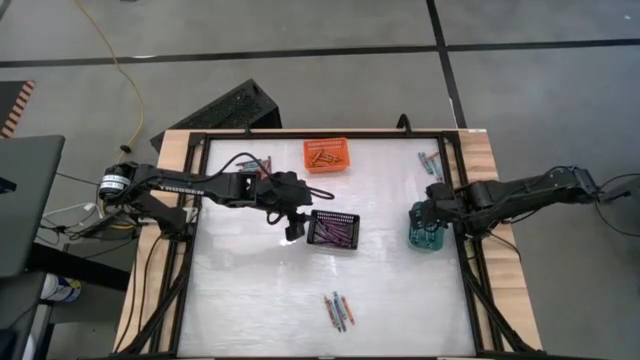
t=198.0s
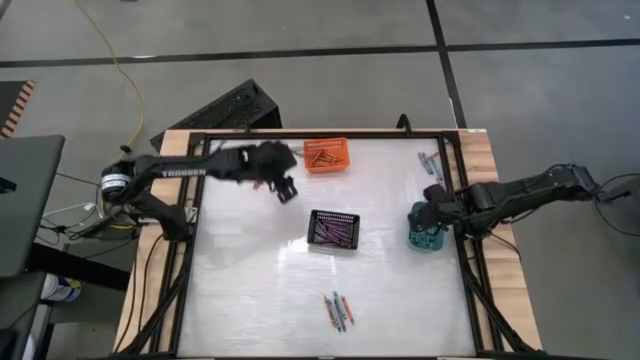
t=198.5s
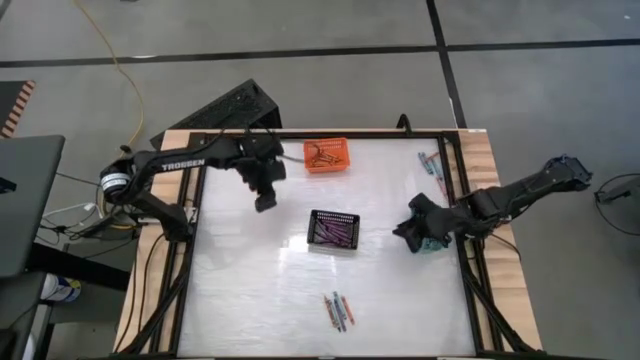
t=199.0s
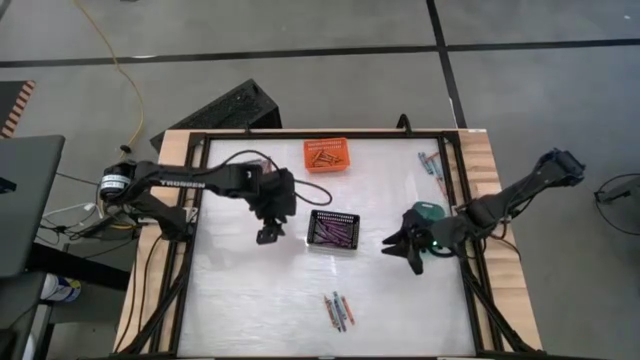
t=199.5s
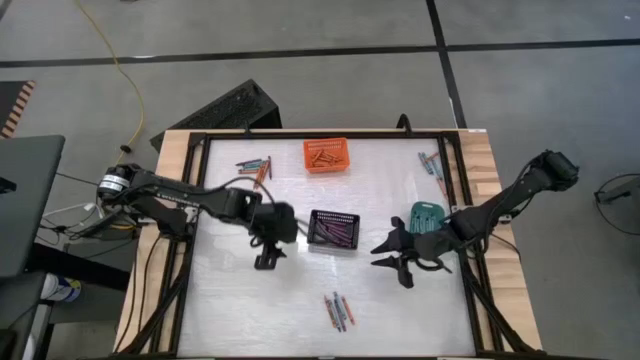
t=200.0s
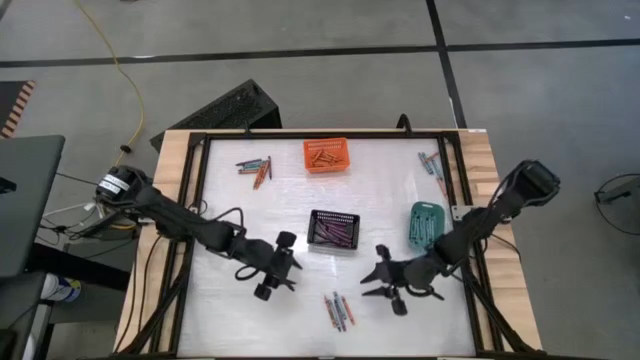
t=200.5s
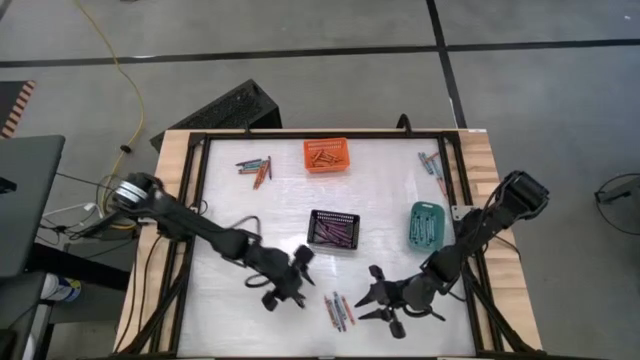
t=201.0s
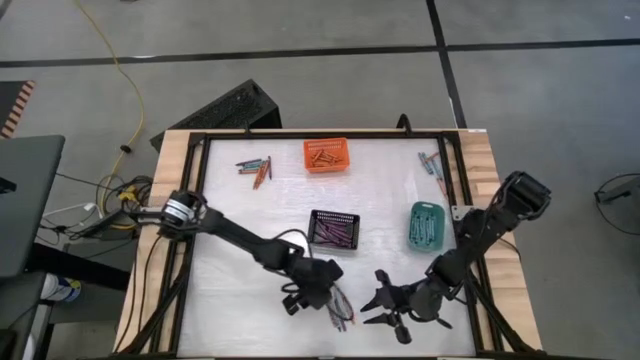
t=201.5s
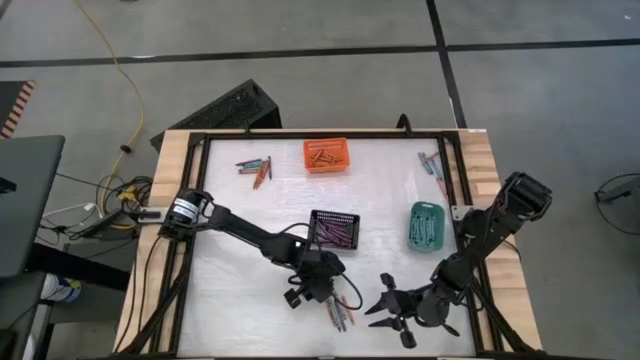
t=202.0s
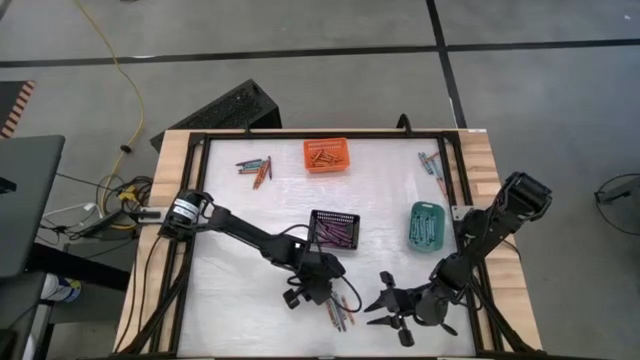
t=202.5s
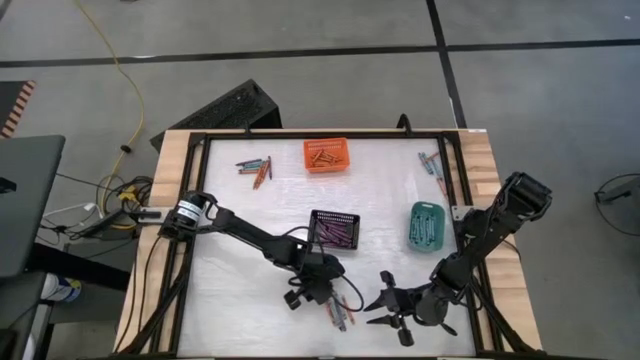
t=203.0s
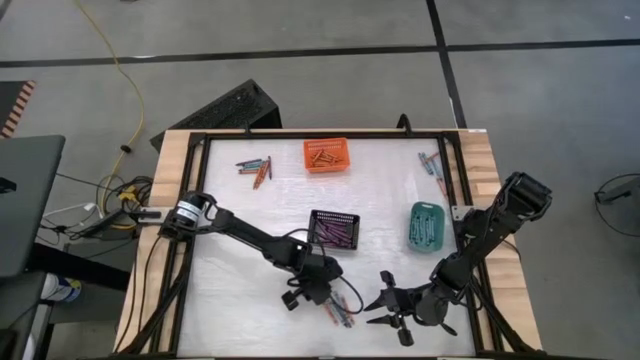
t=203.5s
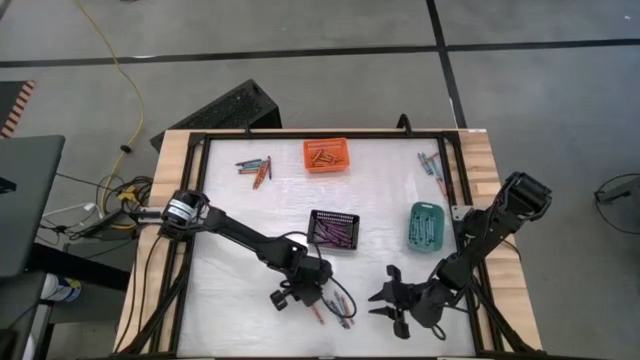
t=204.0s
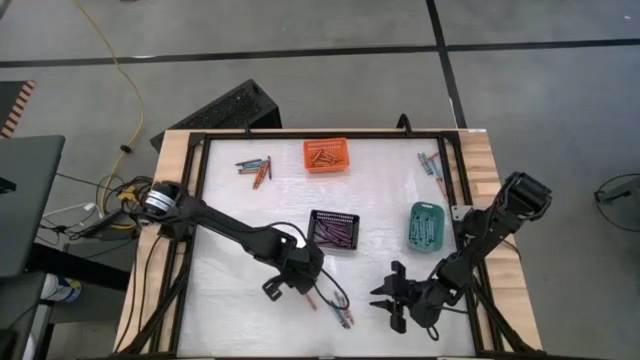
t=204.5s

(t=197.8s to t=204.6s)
Task: Sort crayons
Put the orange crayon into the orange bin

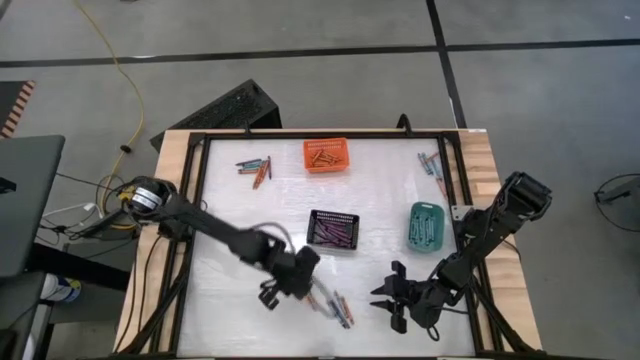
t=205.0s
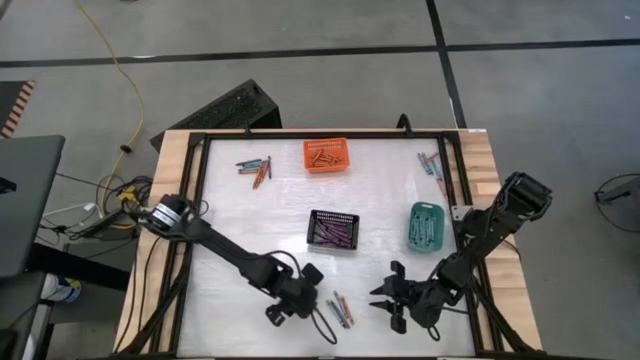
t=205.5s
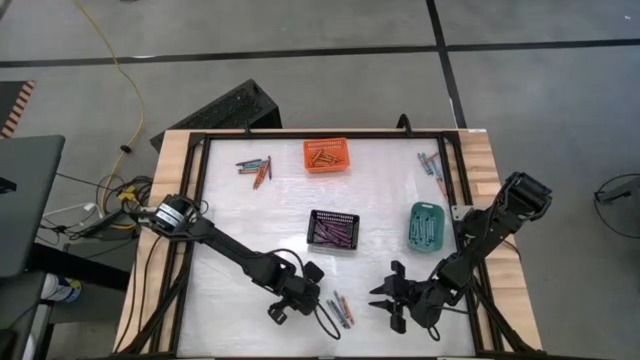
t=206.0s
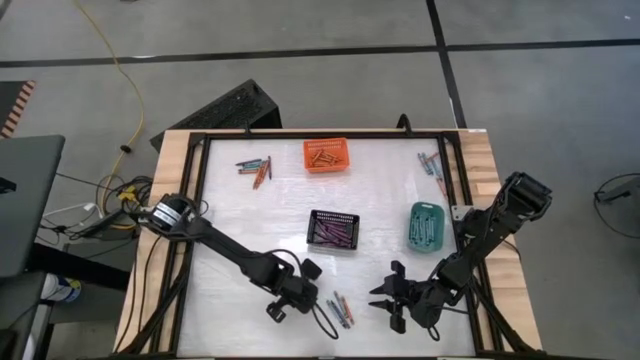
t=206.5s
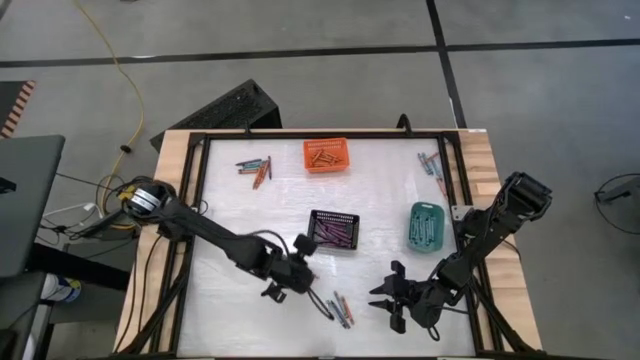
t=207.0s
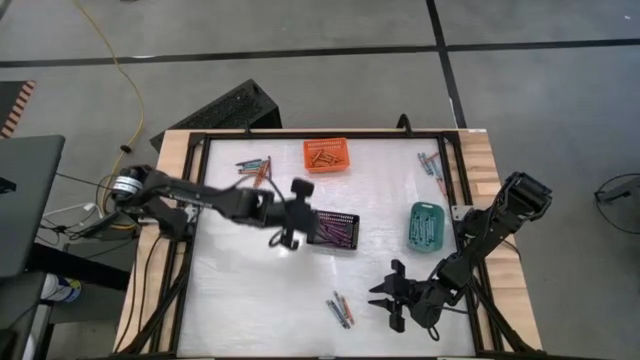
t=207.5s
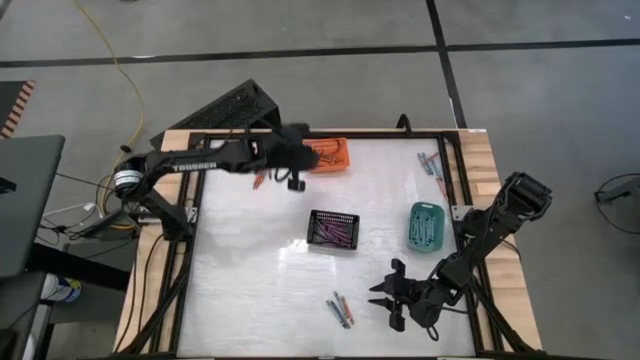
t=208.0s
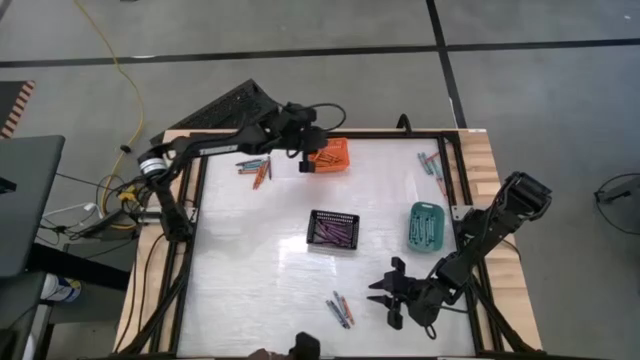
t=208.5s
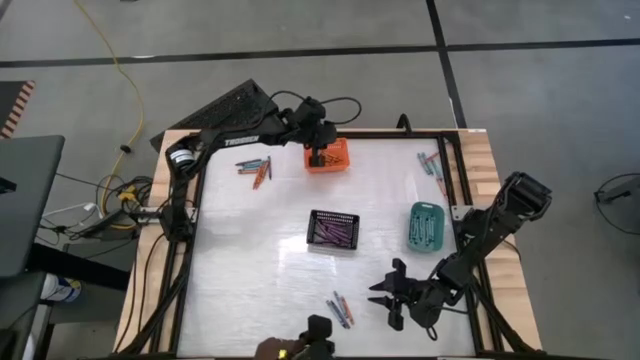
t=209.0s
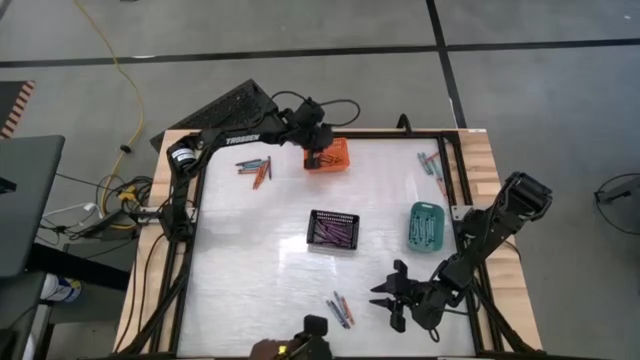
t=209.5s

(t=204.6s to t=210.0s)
Put the orange crayon into the orange bin

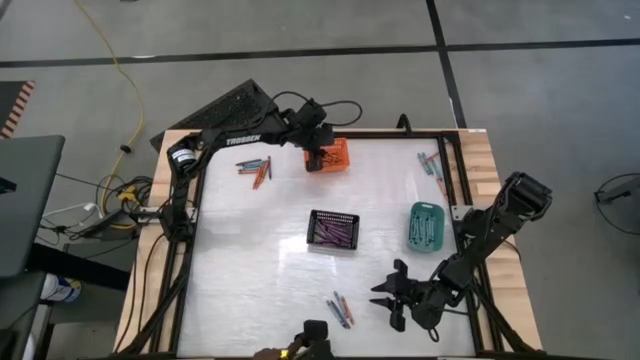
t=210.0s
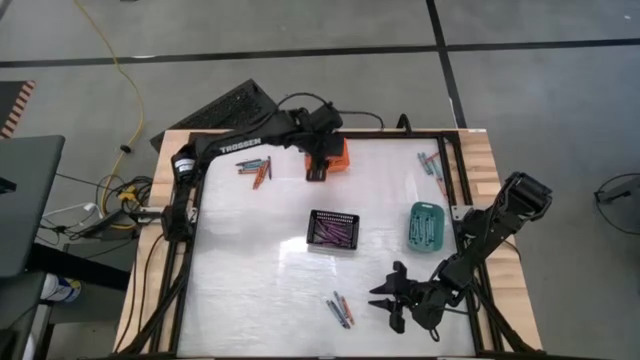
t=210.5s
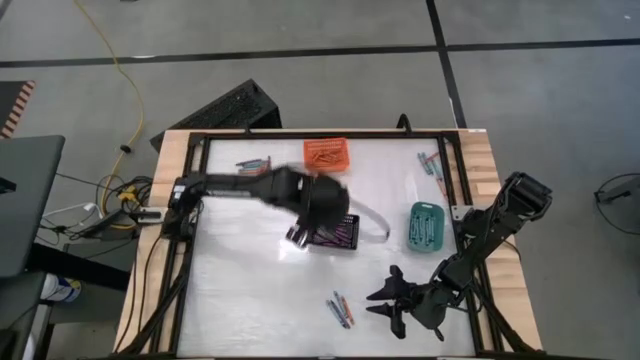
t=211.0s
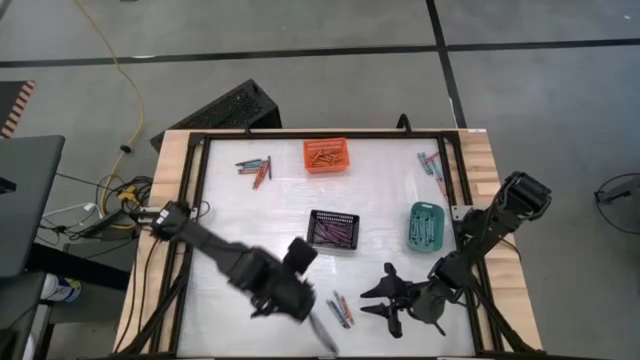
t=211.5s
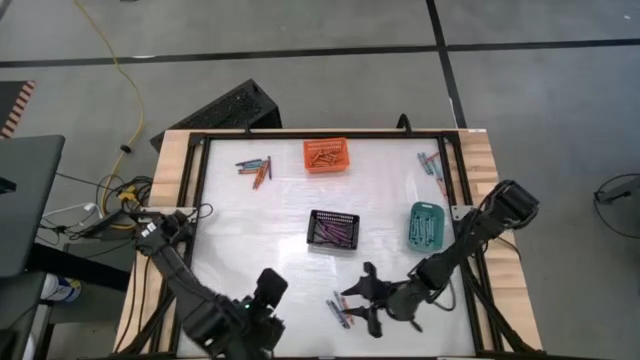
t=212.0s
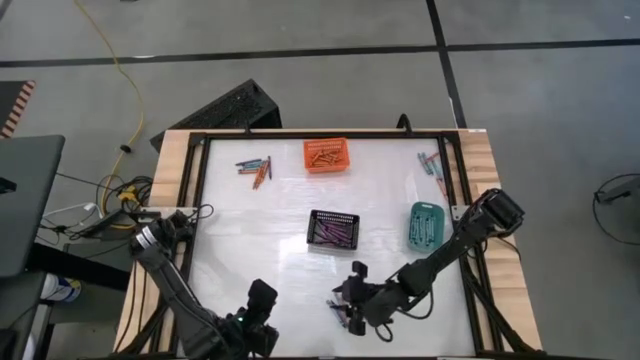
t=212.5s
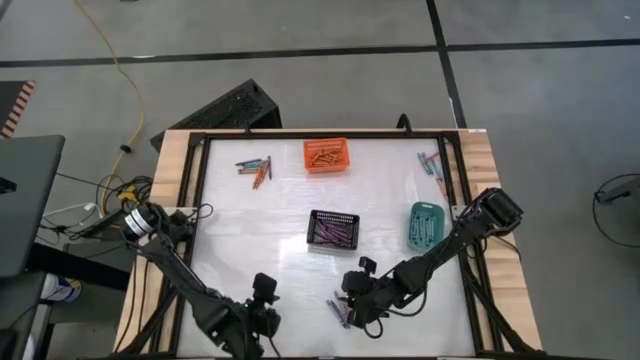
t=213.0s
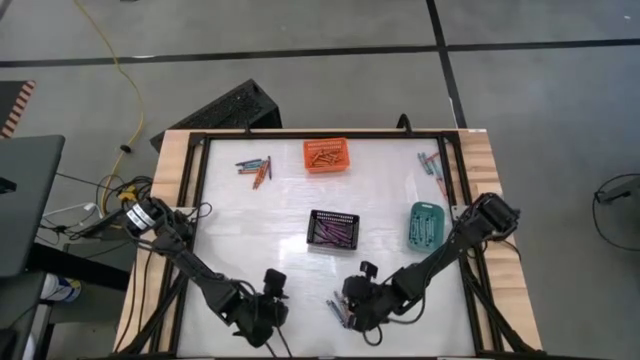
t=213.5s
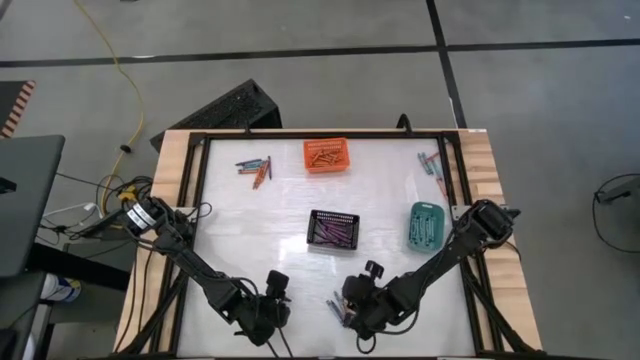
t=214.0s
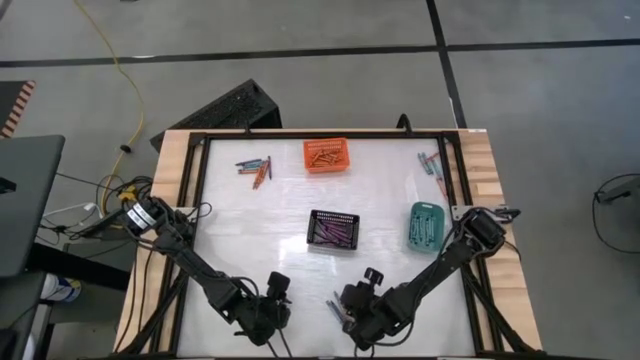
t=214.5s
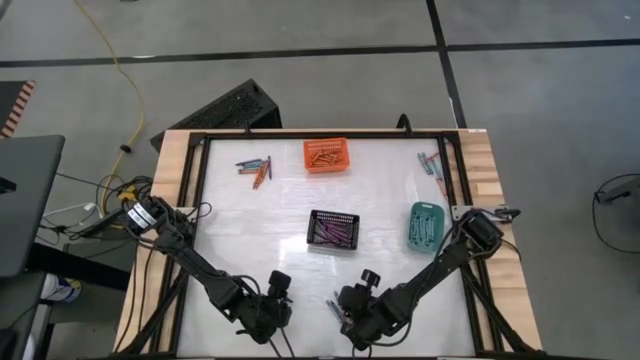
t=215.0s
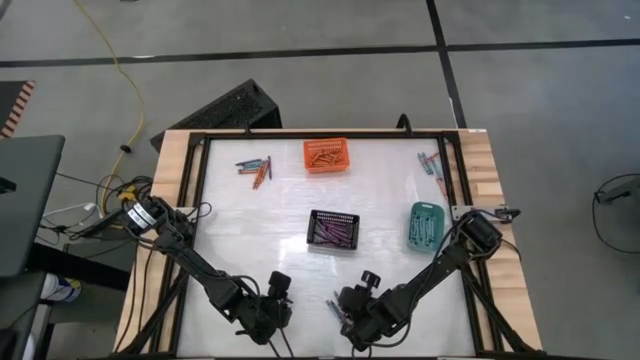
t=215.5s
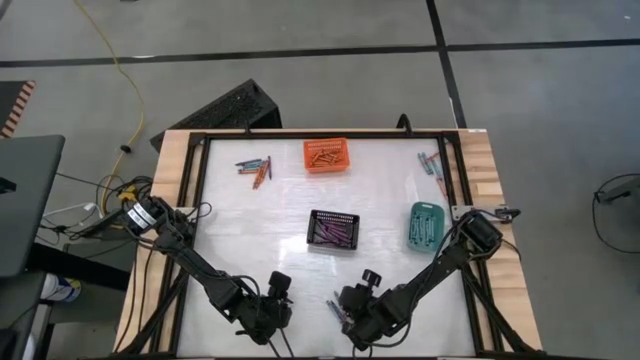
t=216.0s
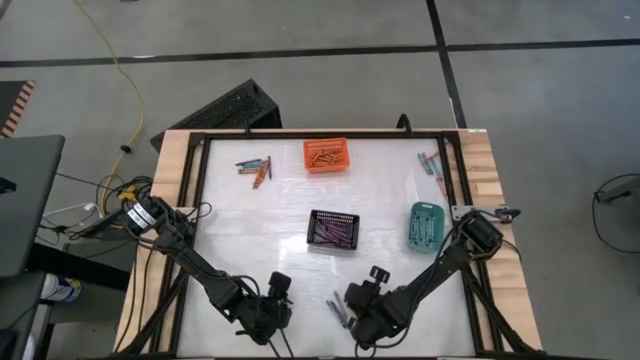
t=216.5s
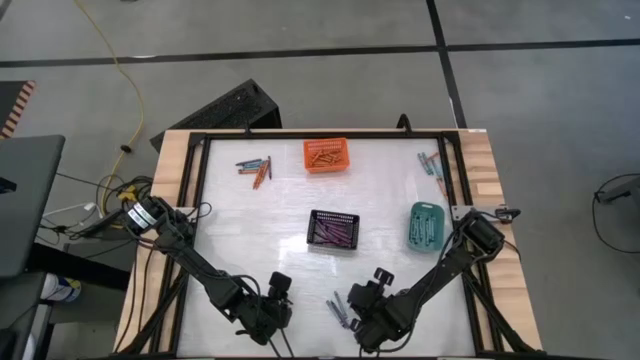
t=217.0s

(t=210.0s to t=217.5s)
Put the orange crayon into the orange bin

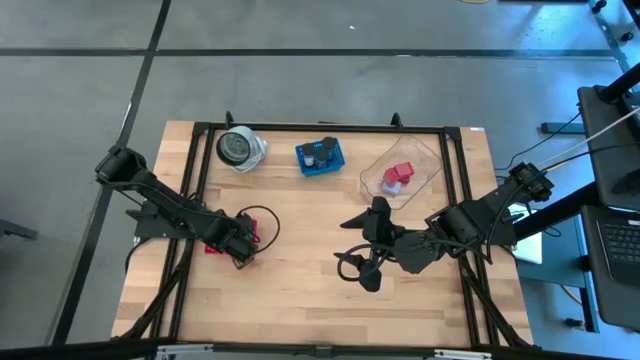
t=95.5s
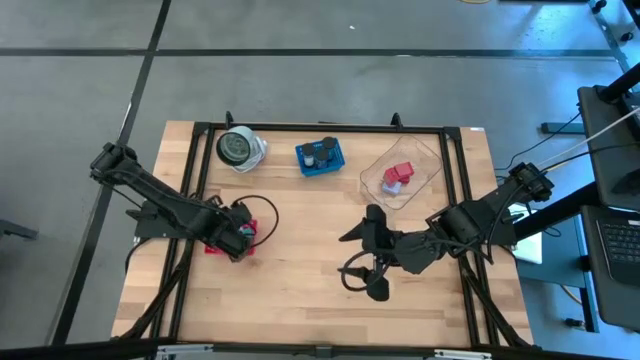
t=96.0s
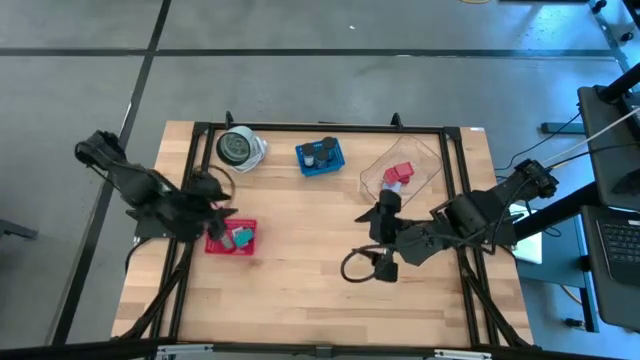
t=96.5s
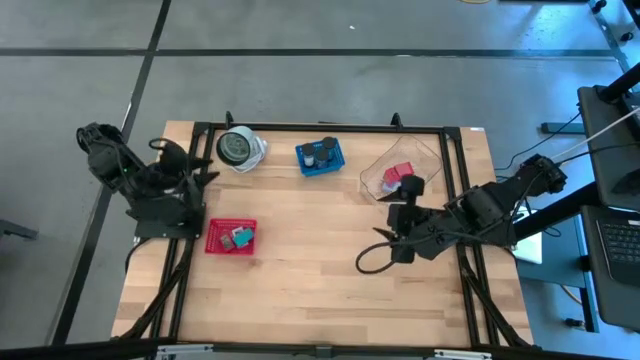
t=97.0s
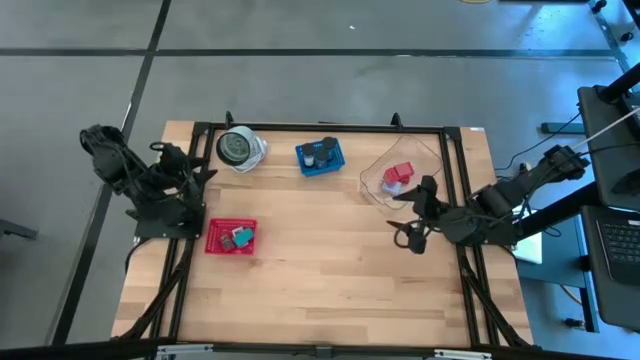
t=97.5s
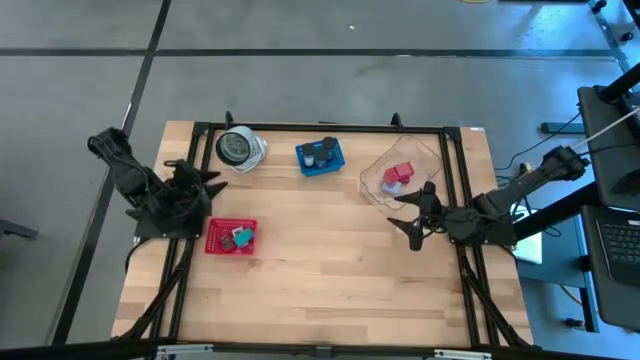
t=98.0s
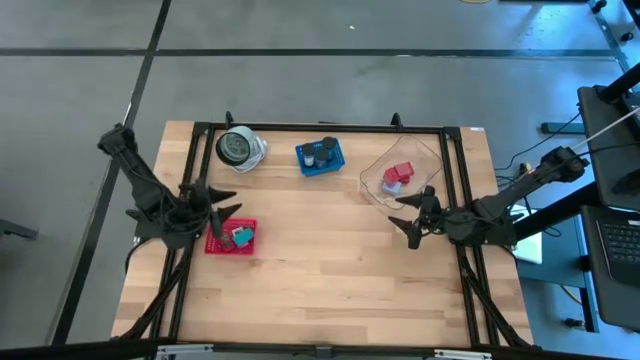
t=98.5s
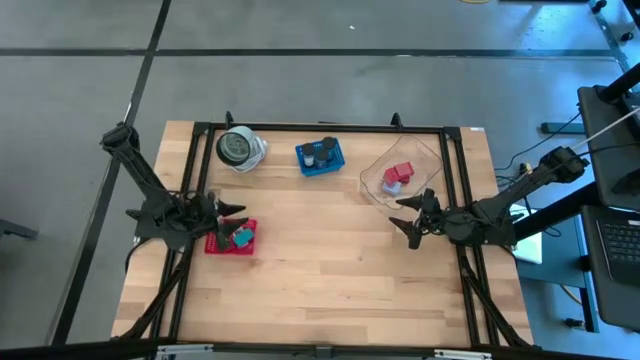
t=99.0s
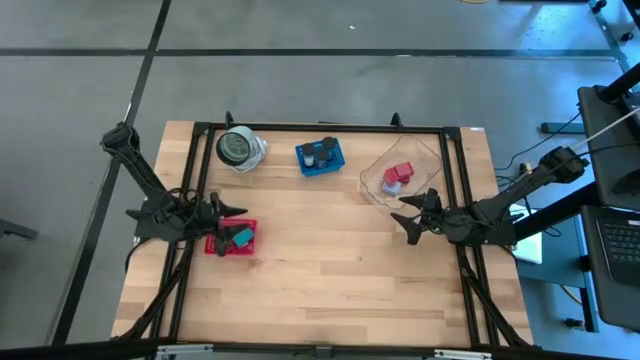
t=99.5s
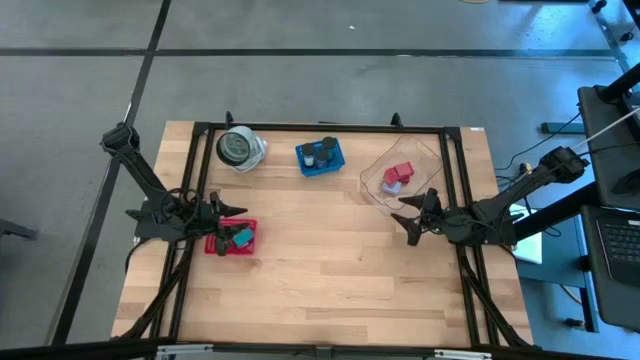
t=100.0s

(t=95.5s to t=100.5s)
Task: Pick & Place Office items
Return to Home Position
